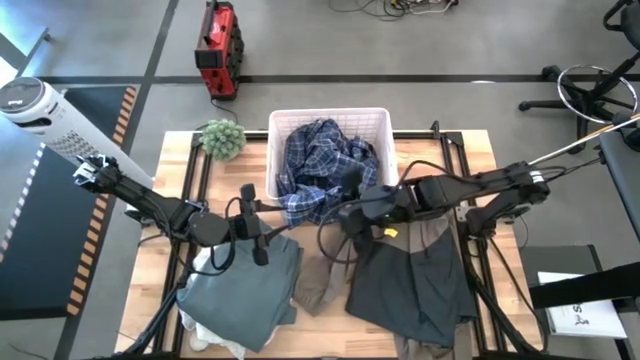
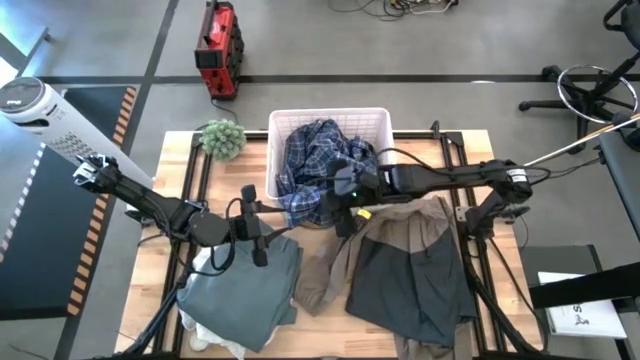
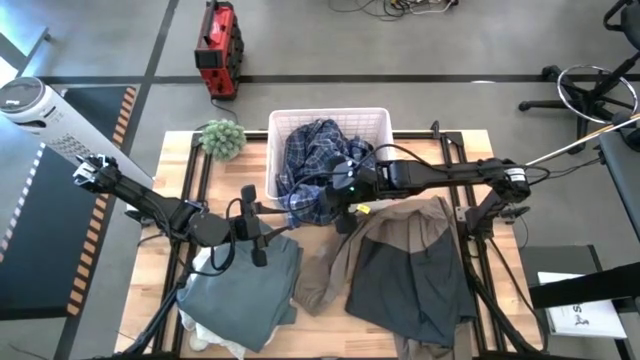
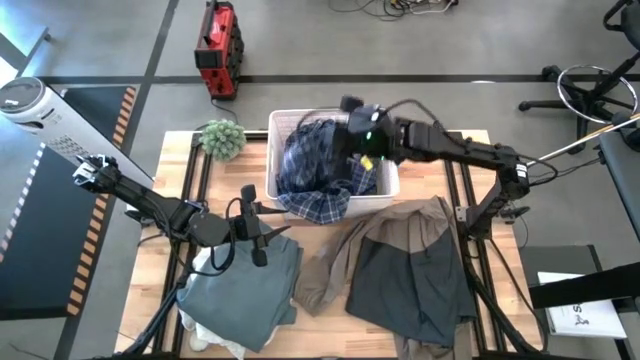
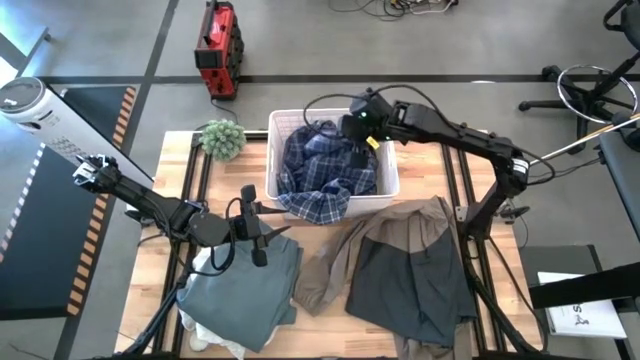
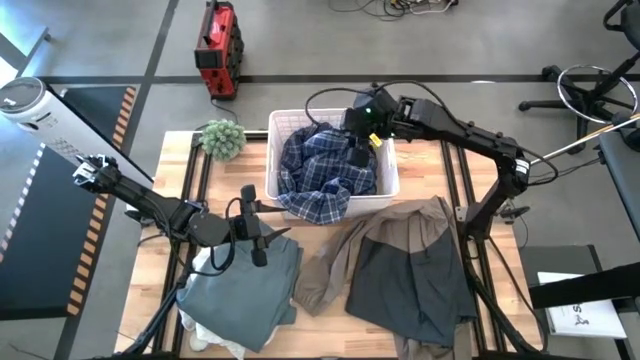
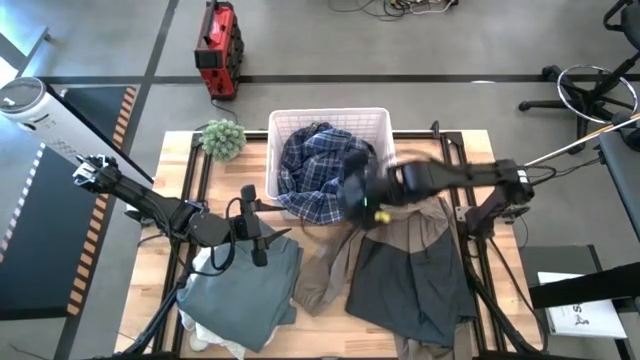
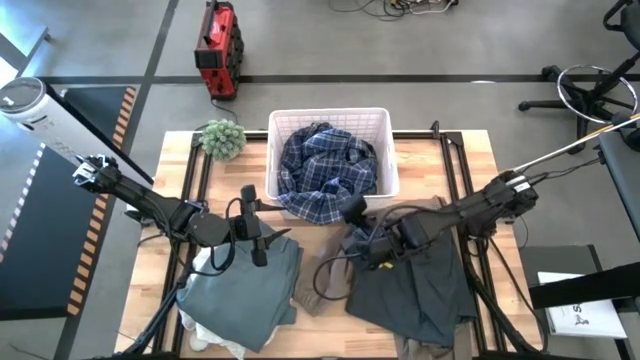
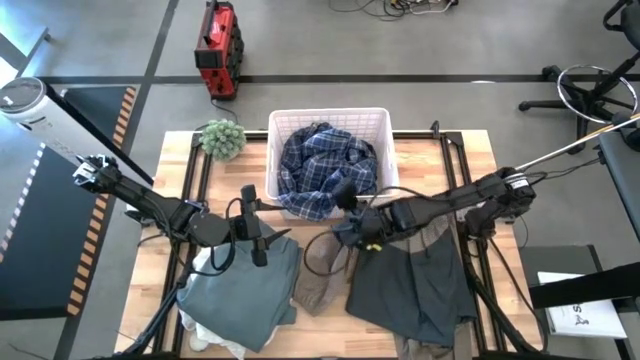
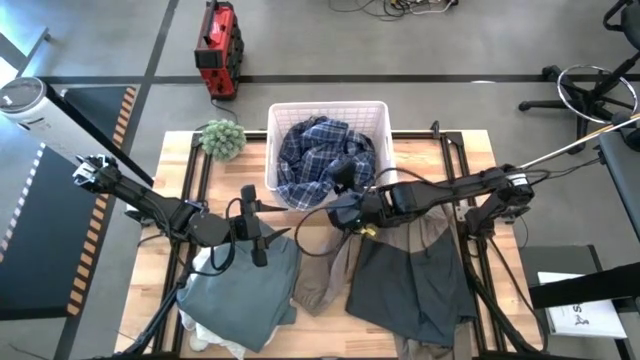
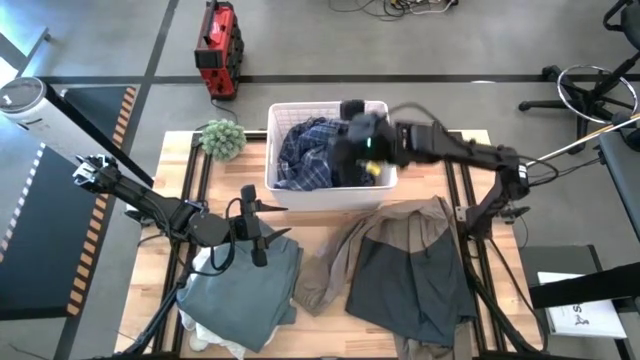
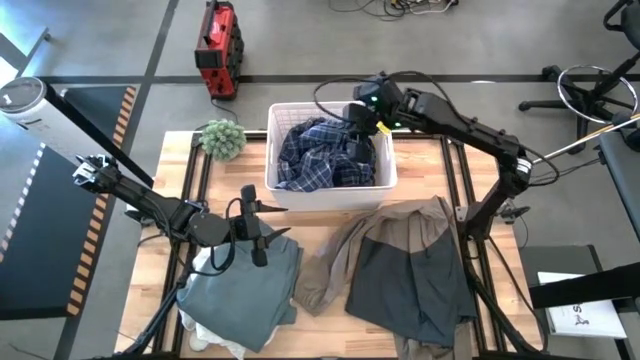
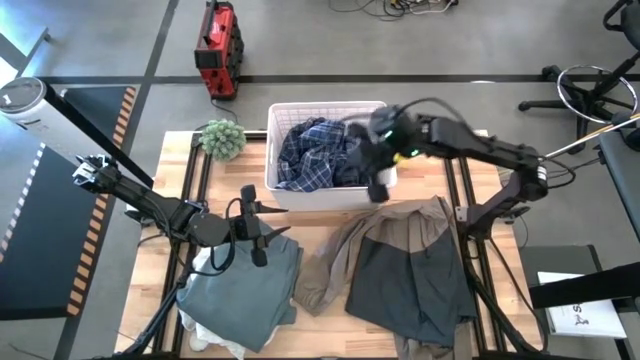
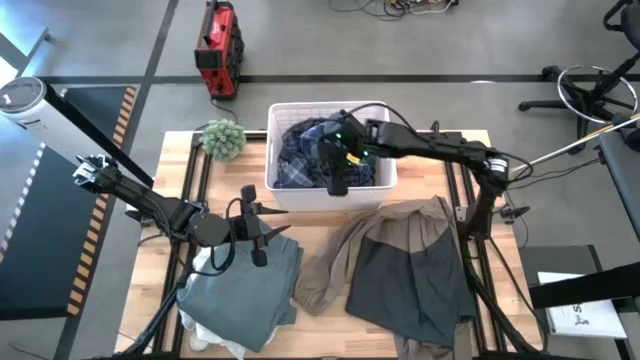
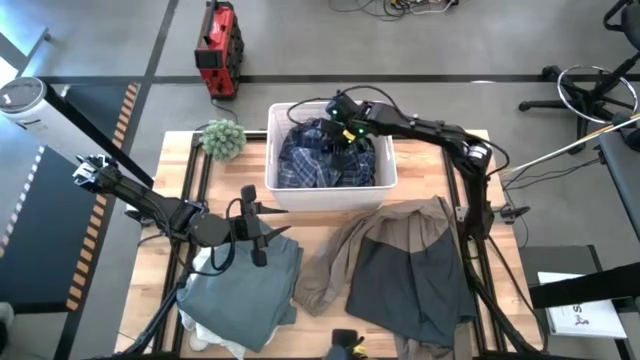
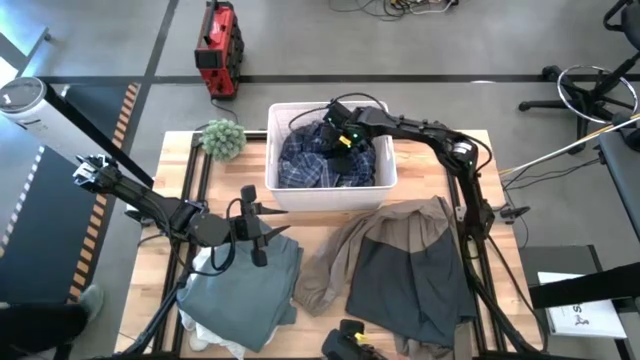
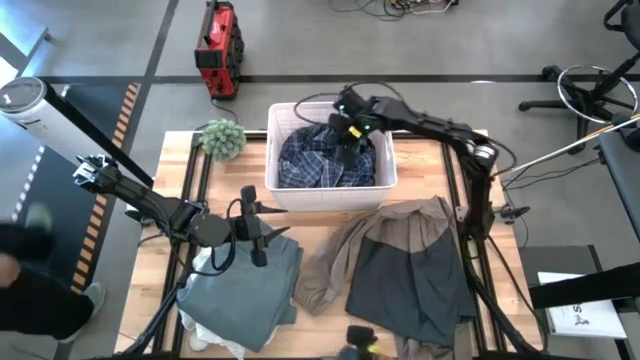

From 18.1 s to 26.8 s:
Task: Sort clothes
Put the blue shirt into the white bin

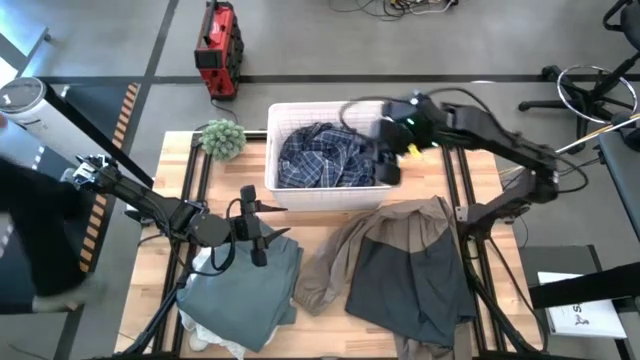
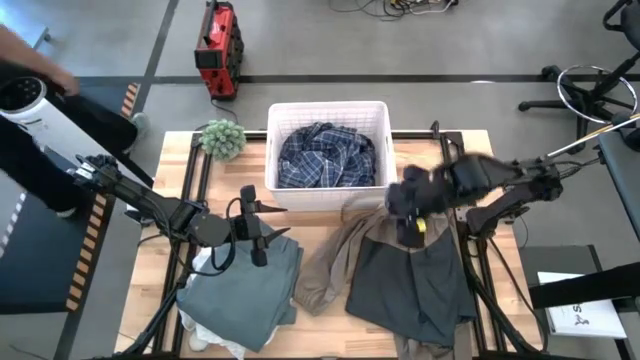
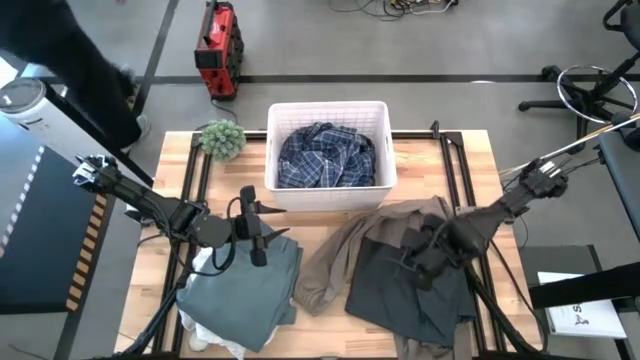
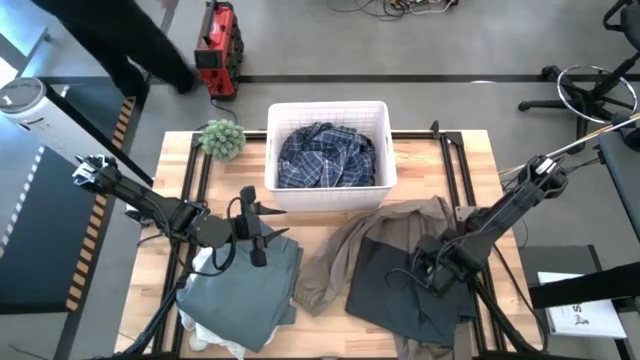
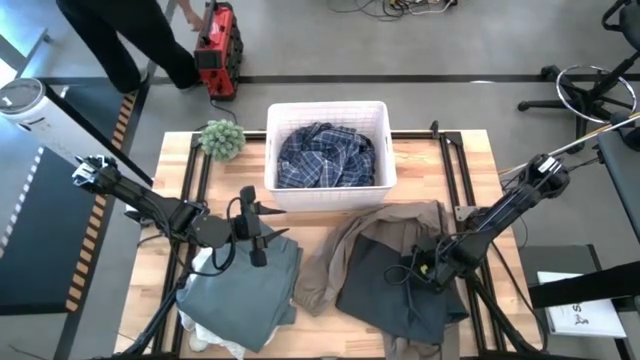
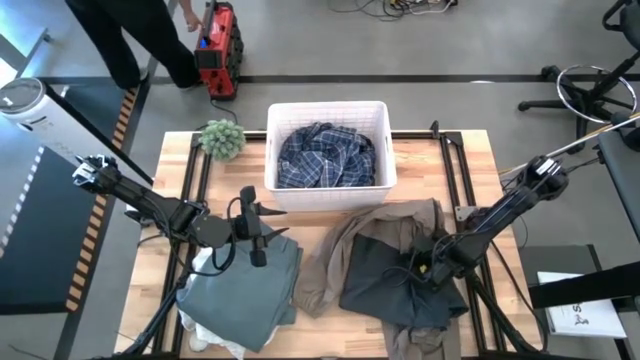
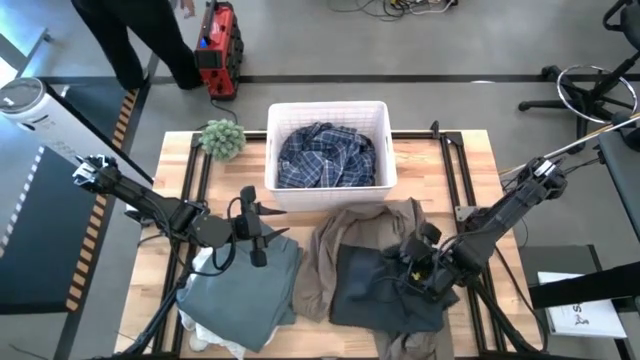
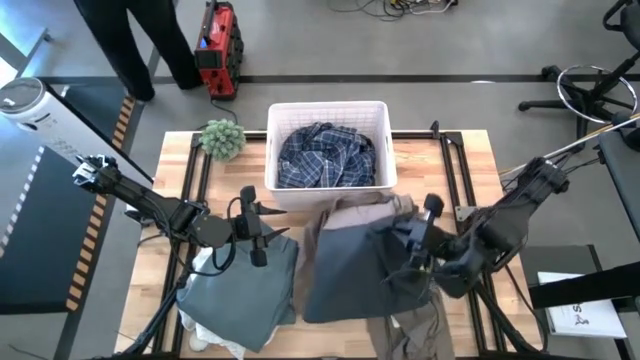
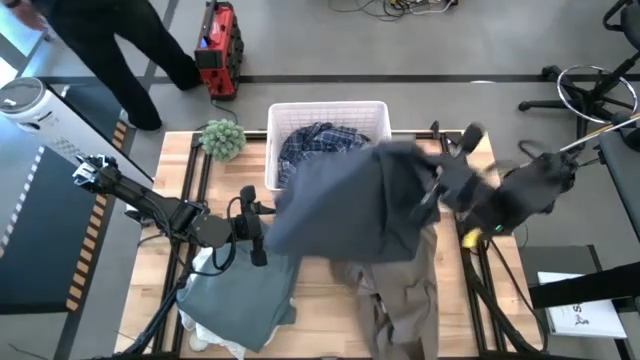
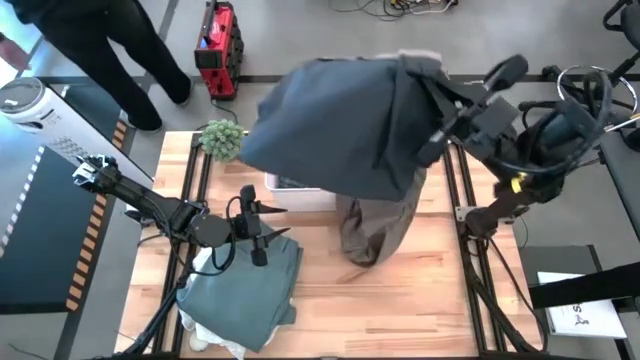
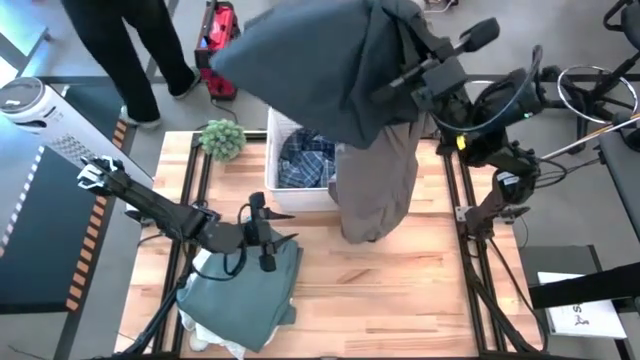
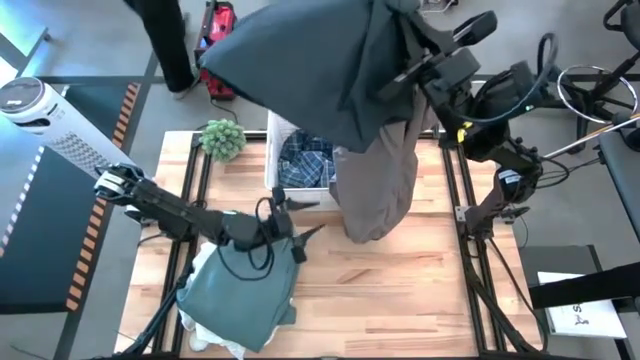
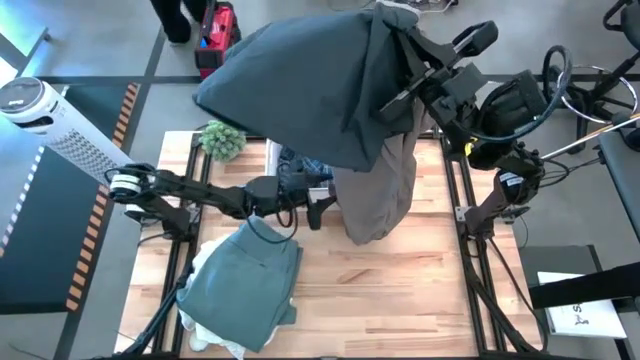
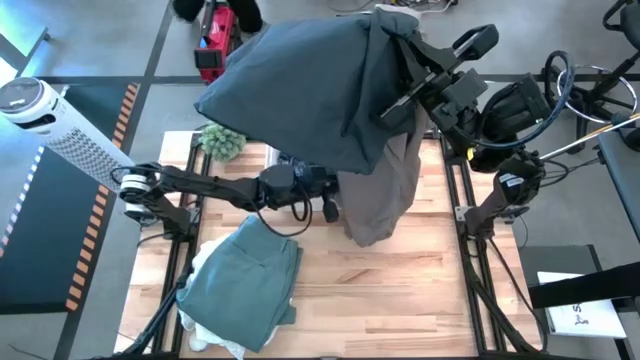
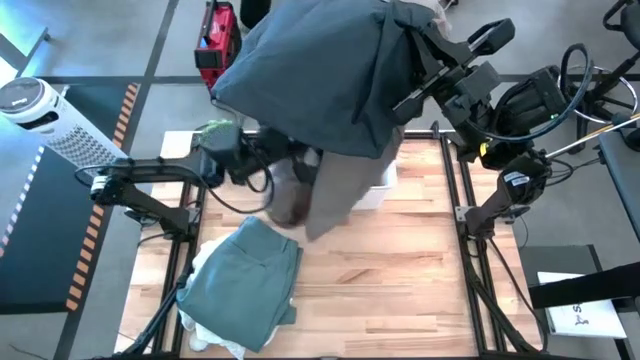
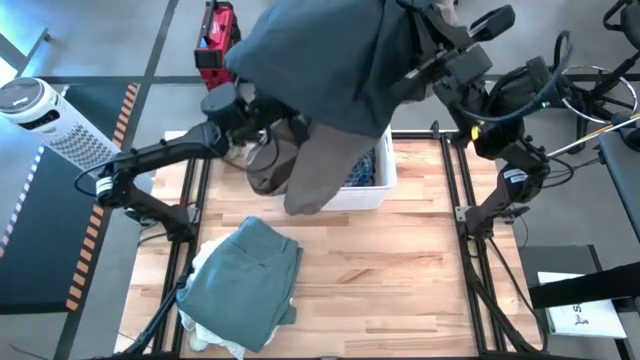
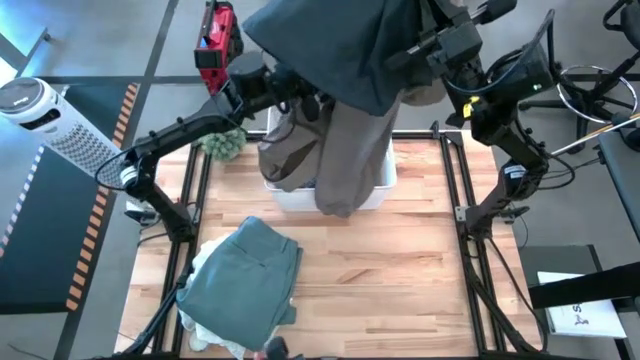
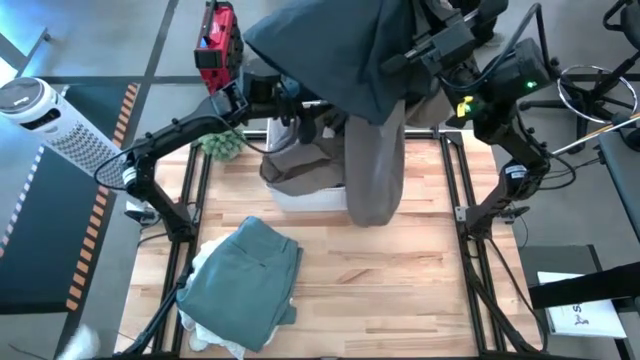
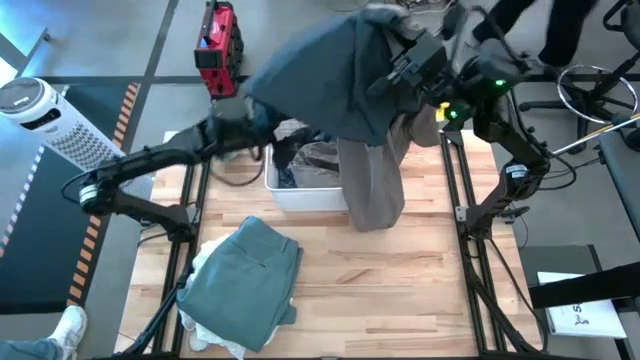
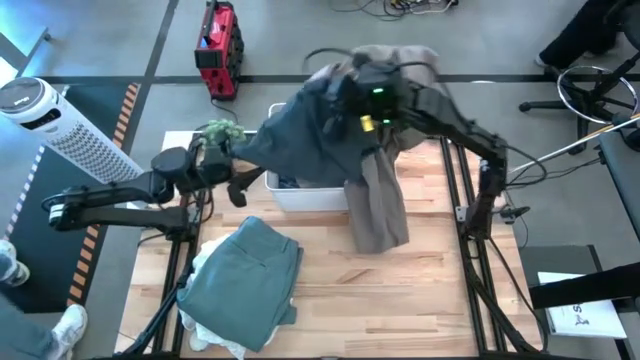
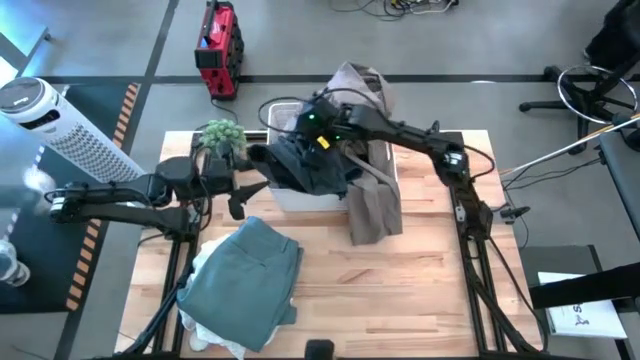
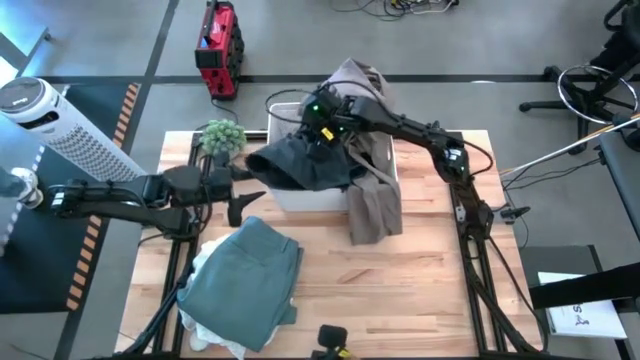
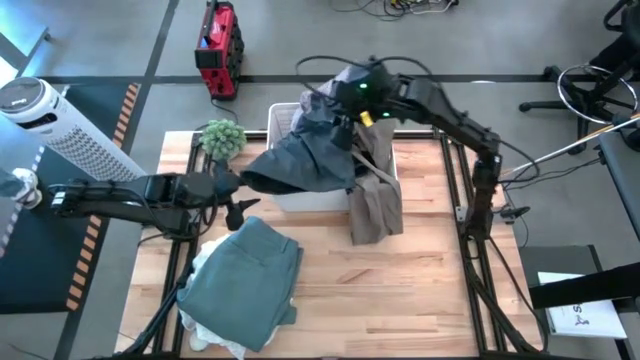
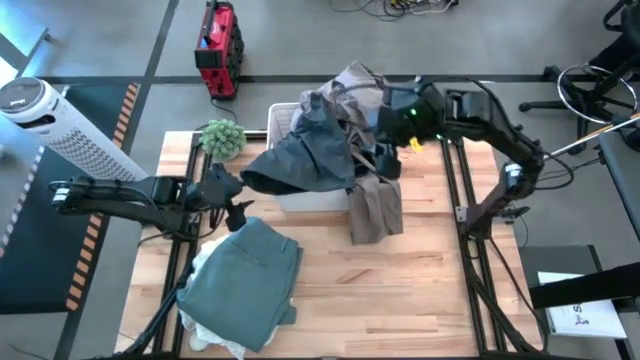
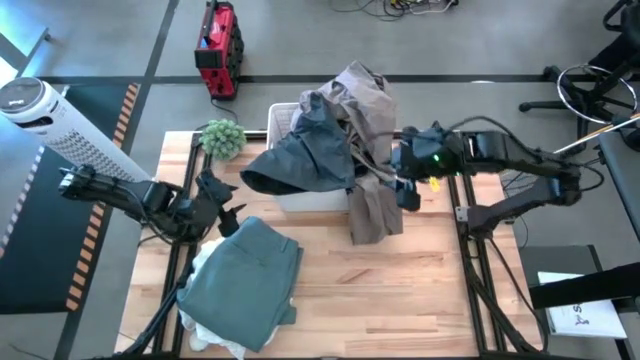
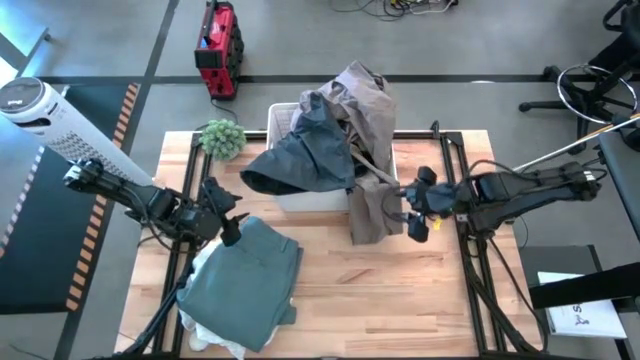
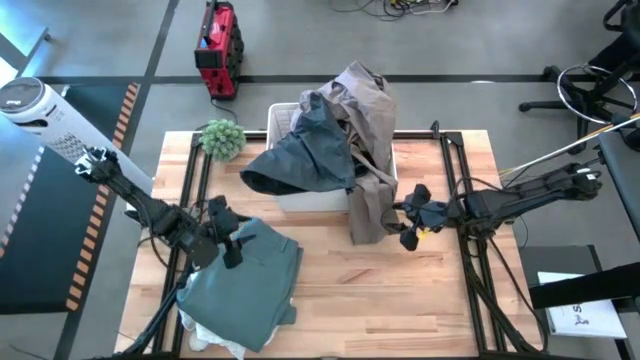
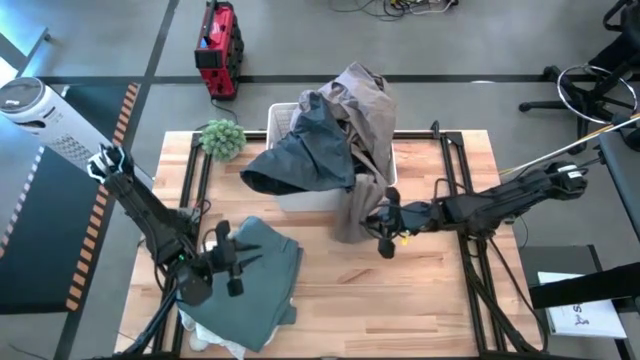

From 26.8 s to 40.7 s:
Put the gray hoodie into the white bin
